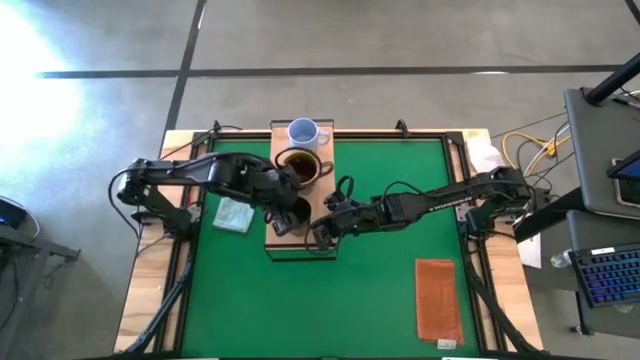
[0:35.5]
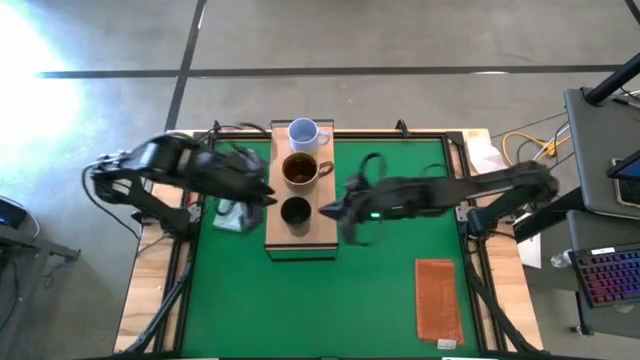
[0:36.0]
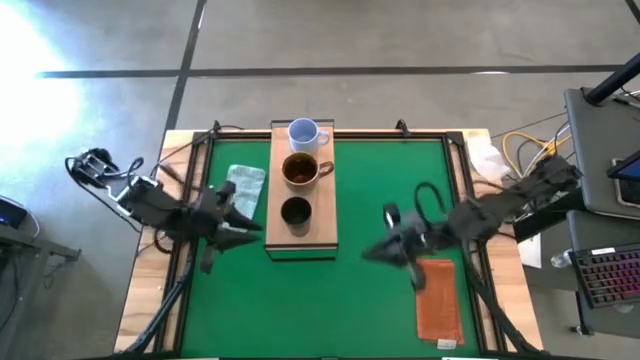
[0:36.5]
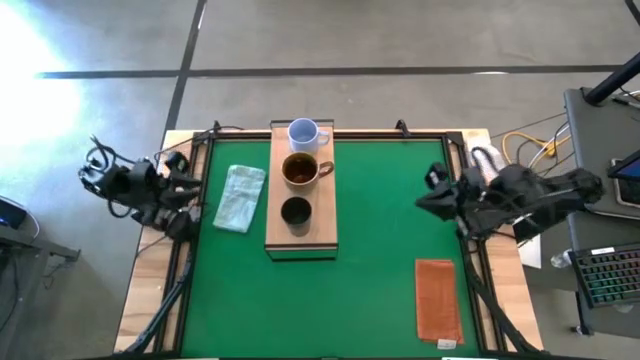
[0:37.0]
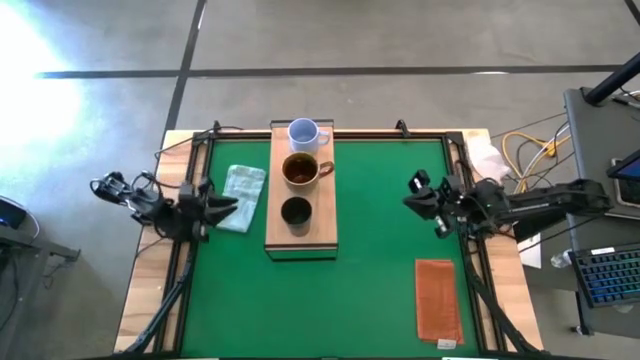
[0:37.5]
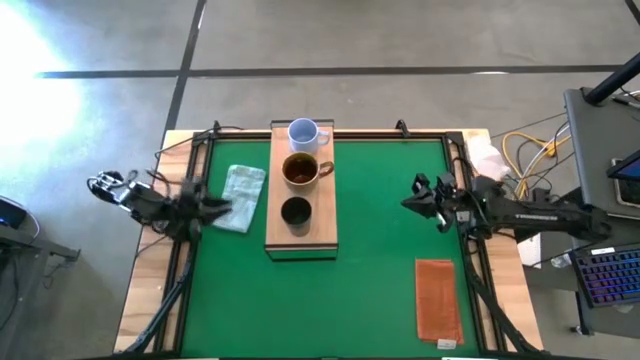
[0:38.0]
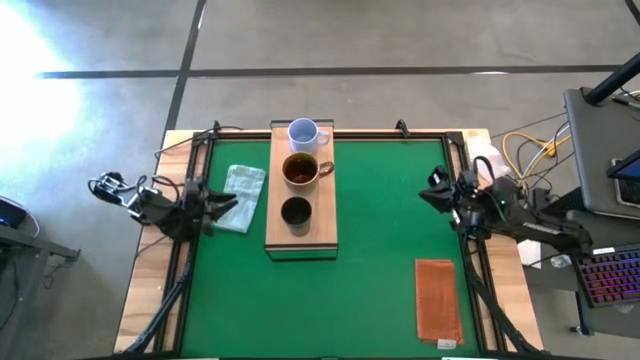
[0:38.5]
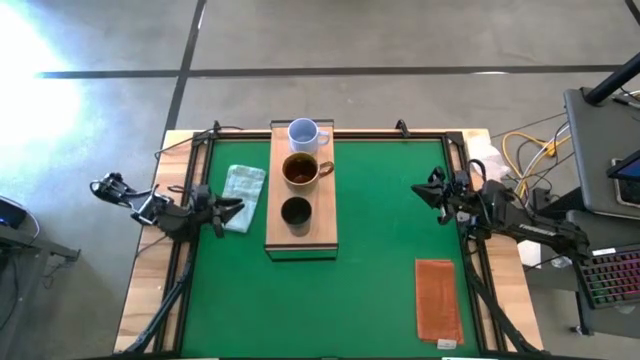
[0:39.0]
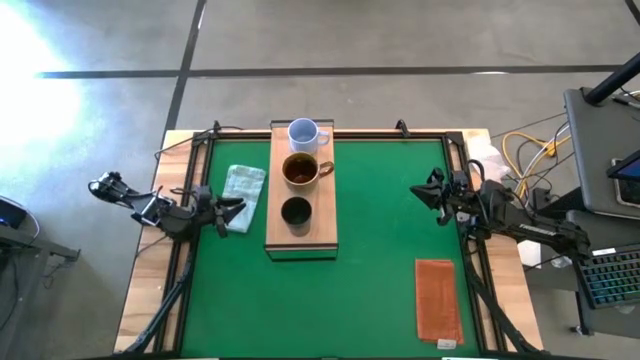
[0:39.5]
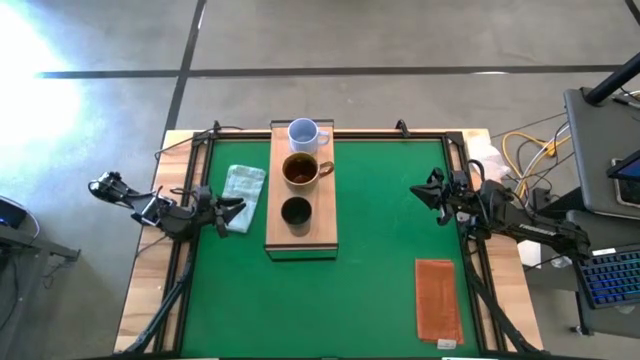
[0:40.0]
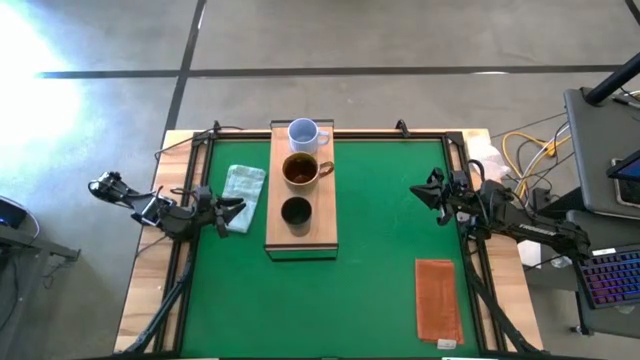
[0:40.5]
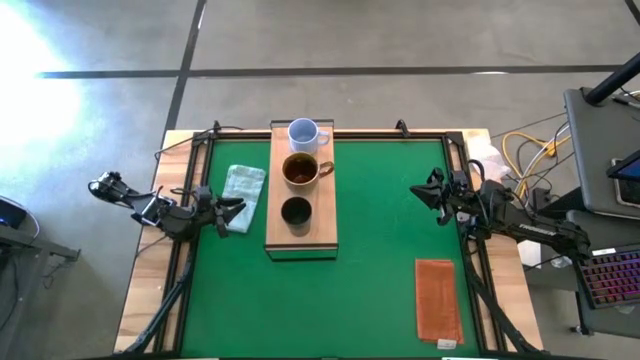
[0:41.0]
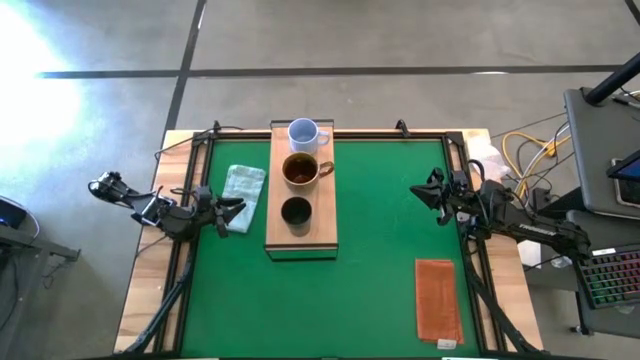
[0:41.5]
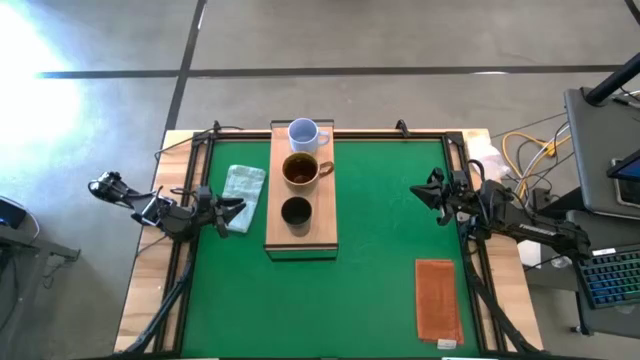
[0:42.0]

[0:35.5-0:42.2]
Task: Stack small to large cups/mugs on shelf
Return to Home Position

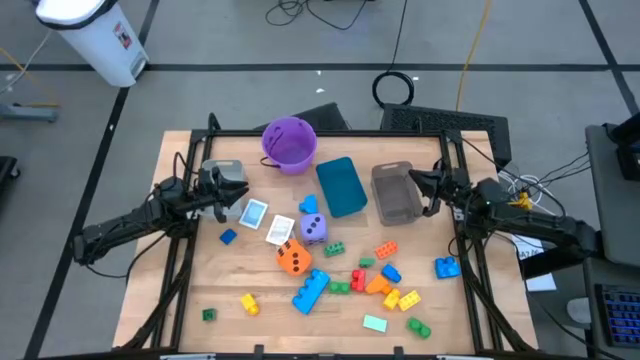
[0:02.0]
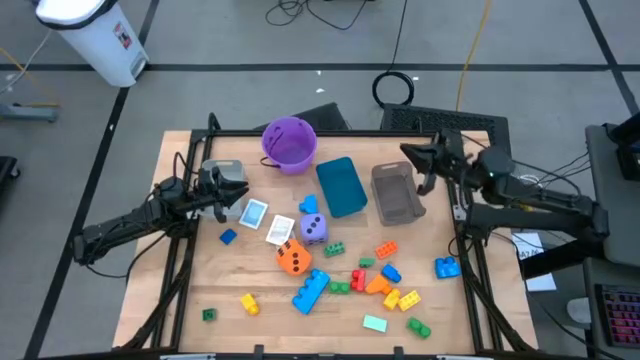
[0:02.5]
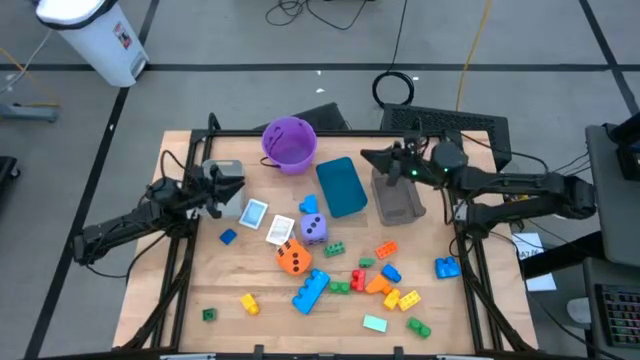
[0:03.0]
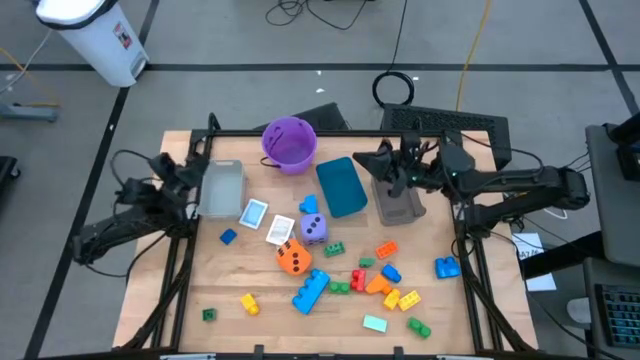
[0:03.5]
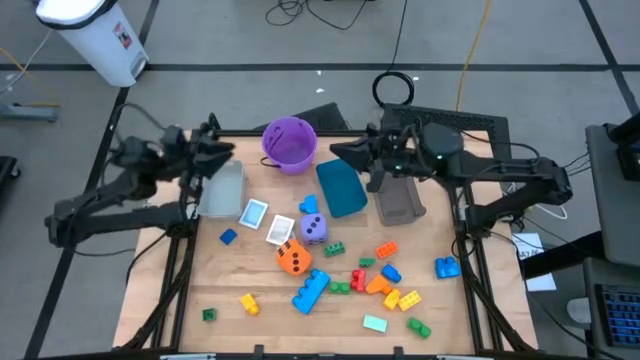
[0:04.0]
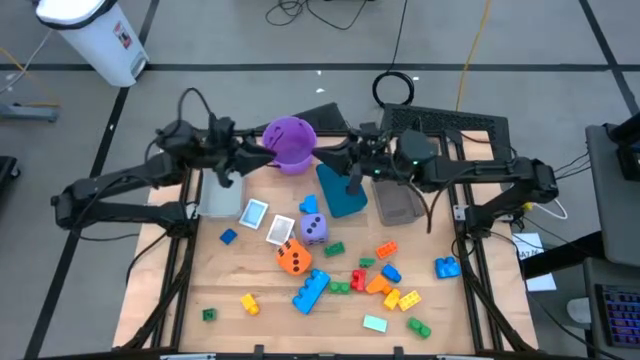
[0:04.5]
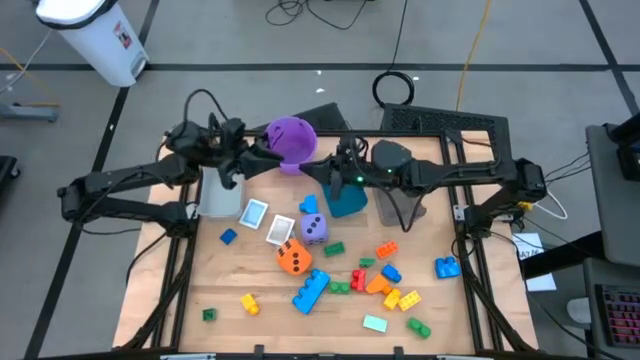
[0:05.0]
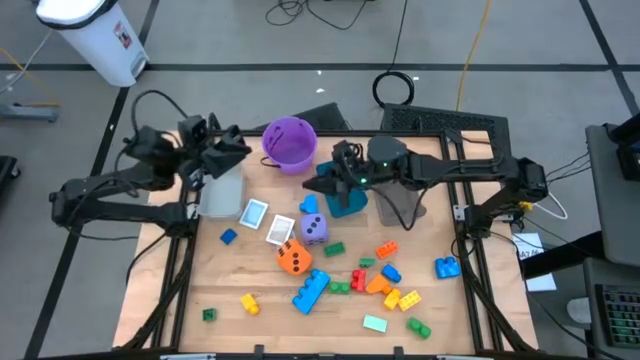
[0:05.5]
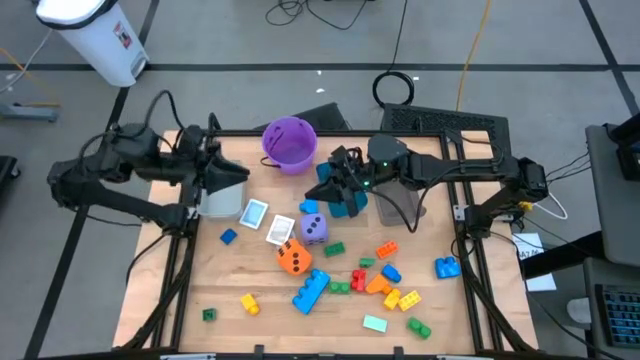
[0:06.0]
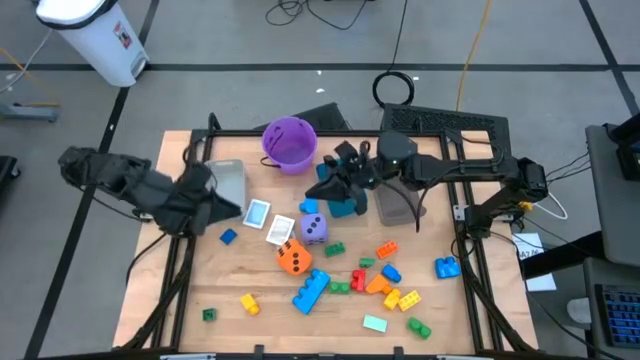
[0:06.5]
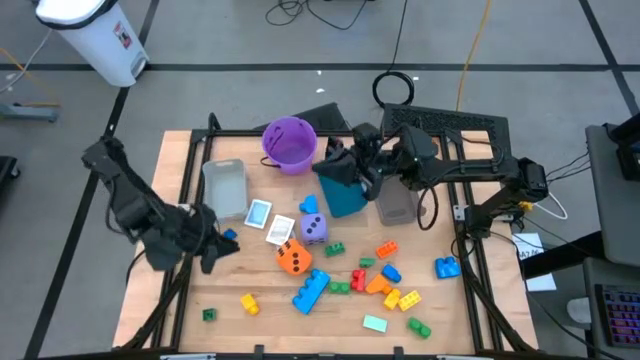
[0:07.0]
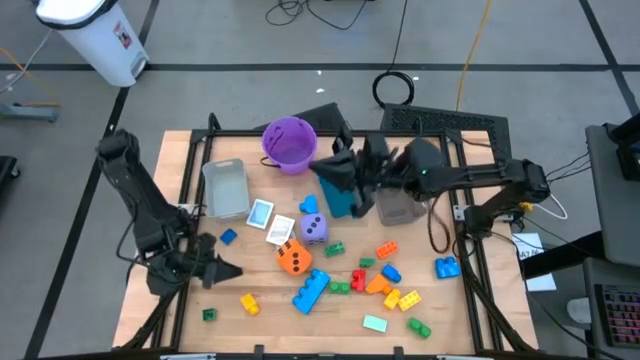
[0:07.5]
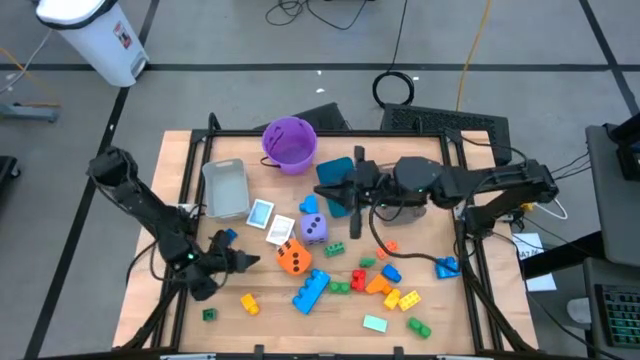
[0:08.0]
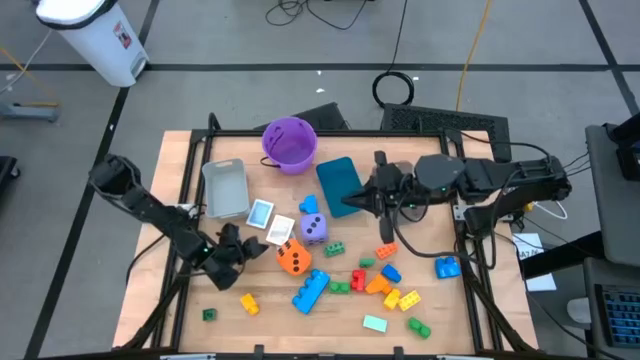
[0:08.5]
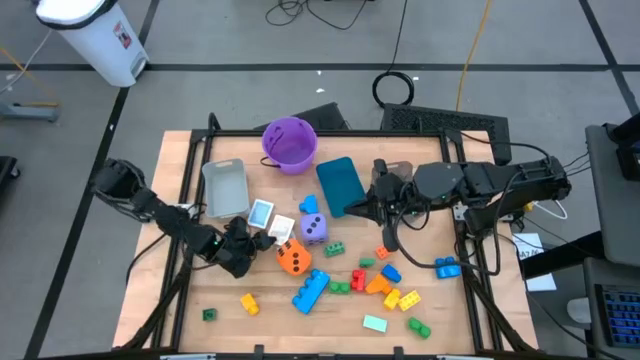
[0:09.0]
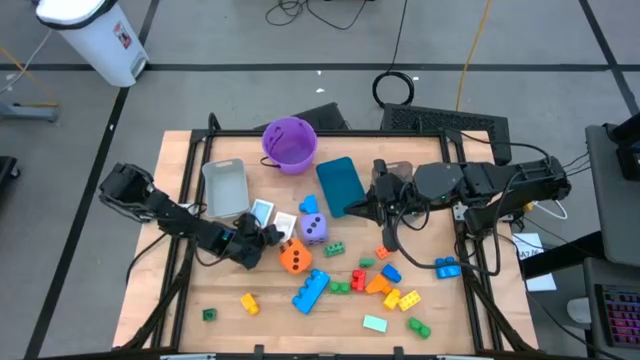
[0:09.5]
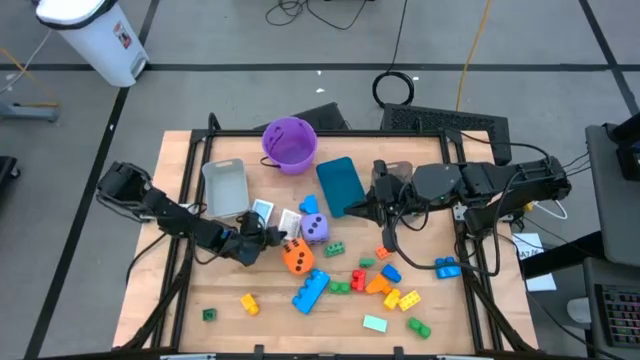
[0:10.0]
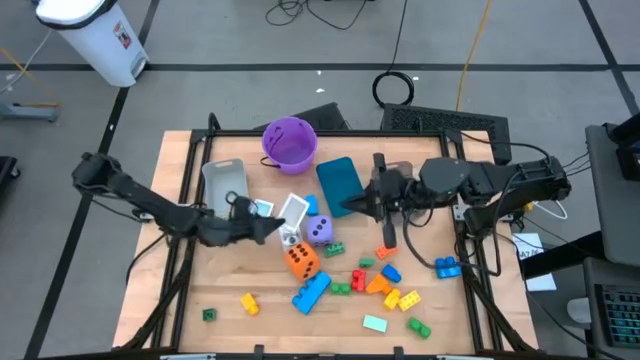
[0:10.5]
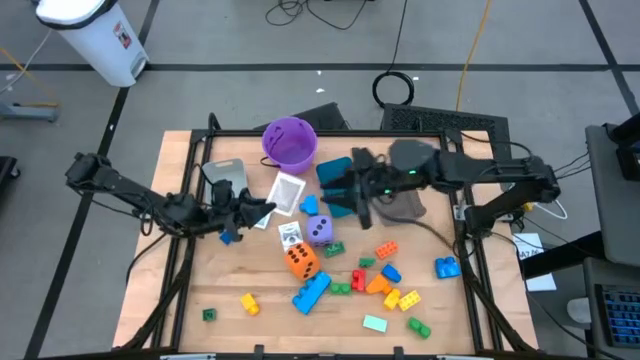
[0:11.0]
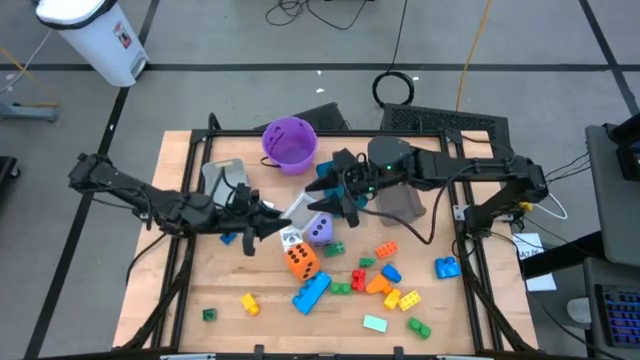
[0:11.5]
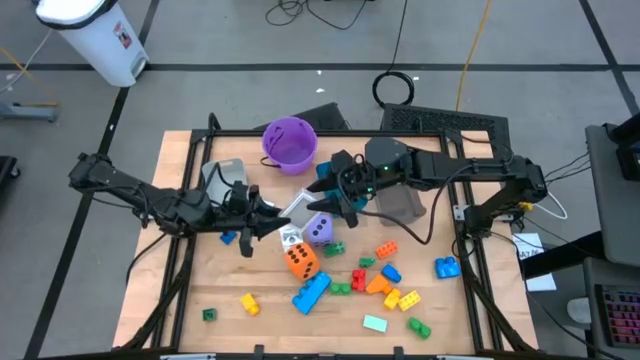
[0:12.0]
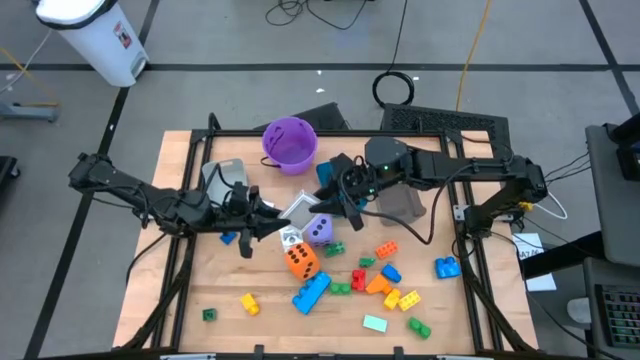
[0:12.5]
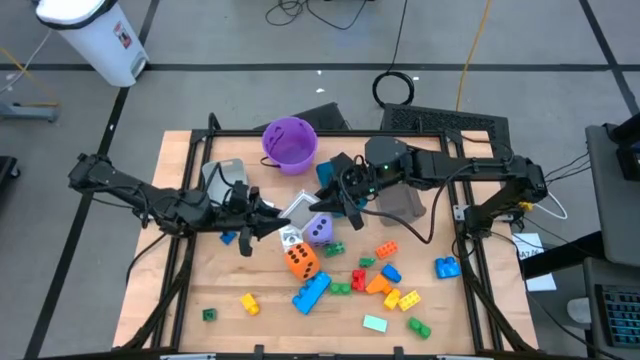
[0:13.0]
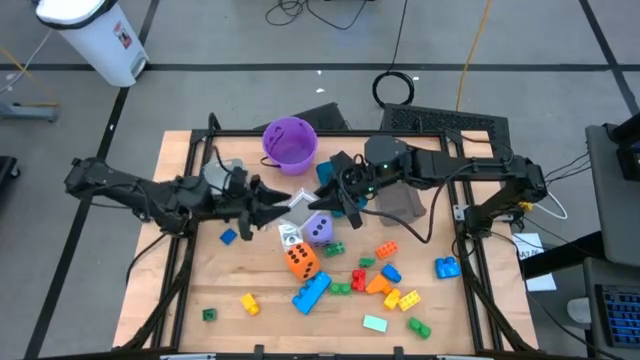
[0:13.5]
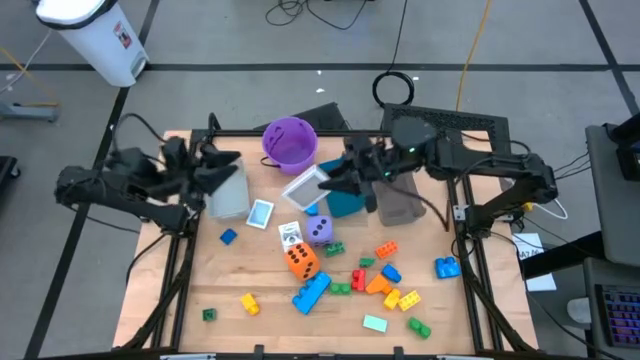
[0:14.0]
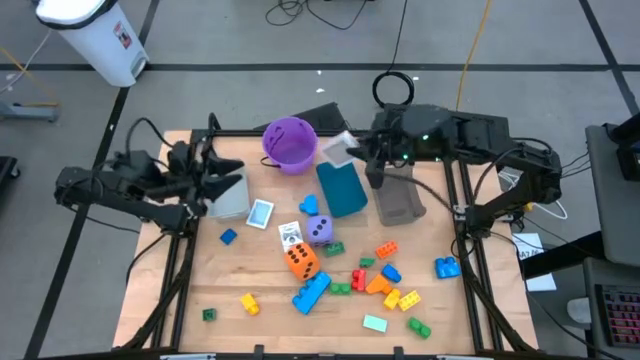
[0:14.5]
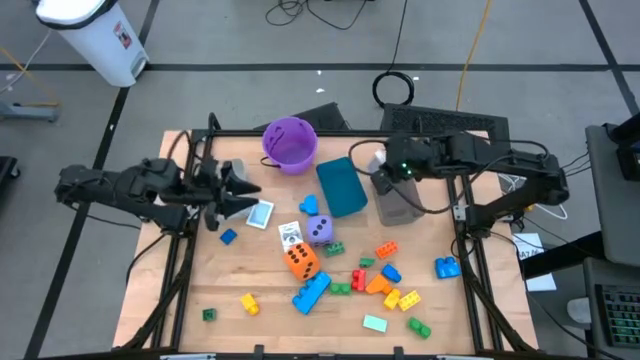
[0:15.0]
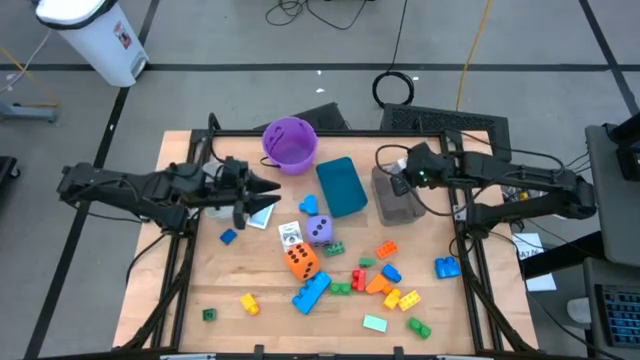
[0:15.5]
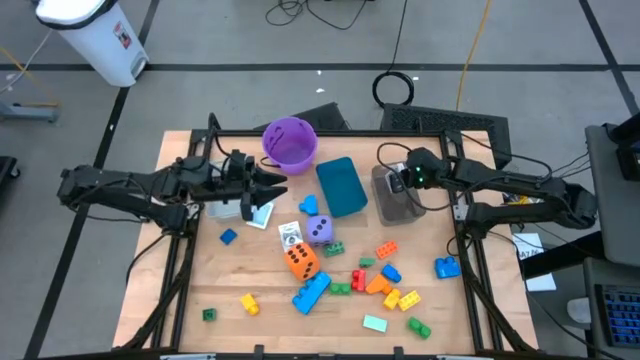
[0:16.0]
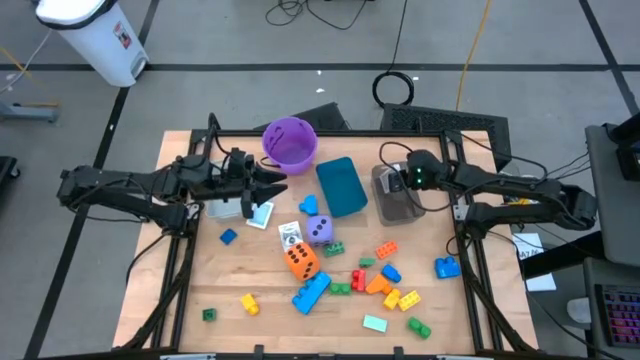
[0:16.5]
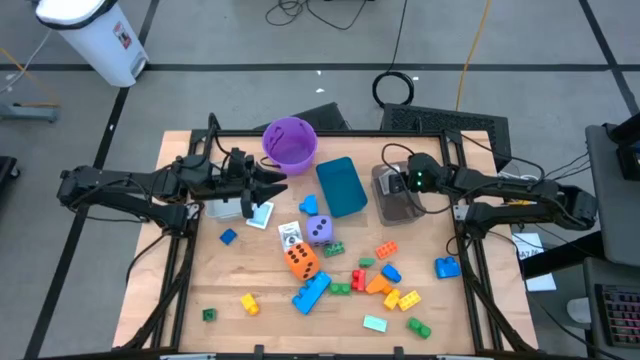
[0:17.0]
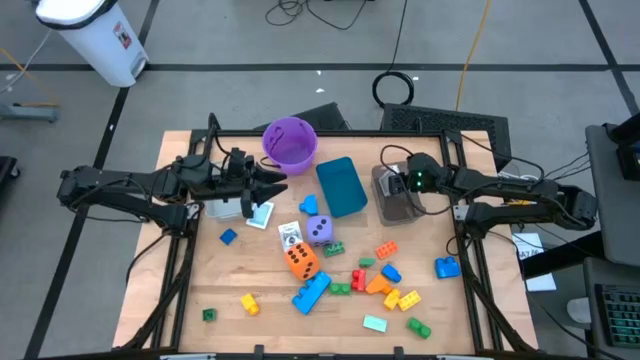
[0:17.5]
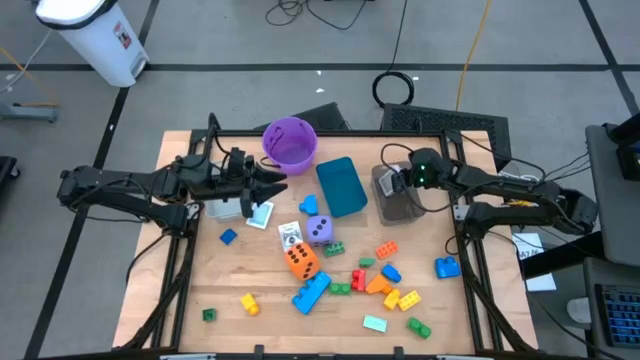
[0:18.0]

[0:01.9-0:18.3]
Task: Pick & Place Toys
Put the brown deck of cards into the black bin
